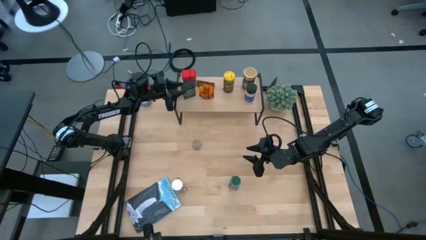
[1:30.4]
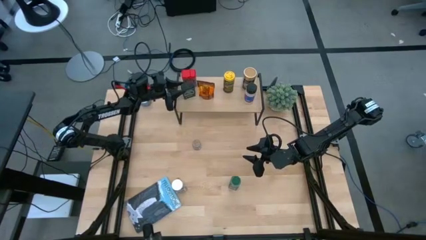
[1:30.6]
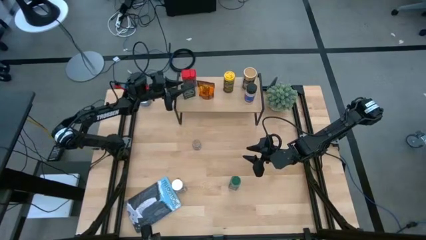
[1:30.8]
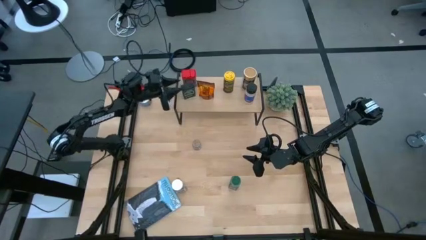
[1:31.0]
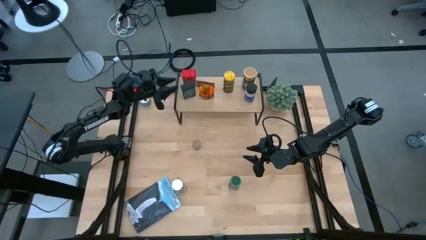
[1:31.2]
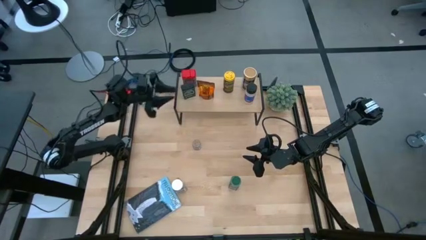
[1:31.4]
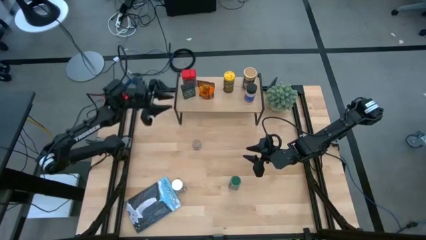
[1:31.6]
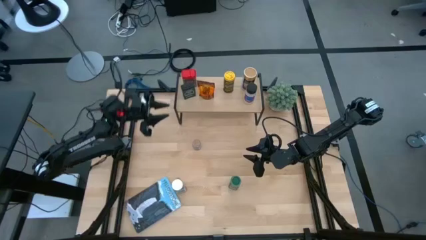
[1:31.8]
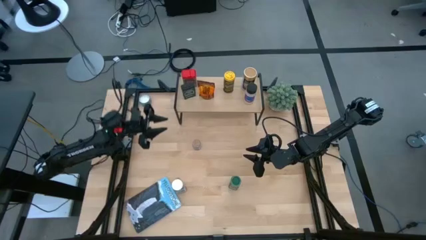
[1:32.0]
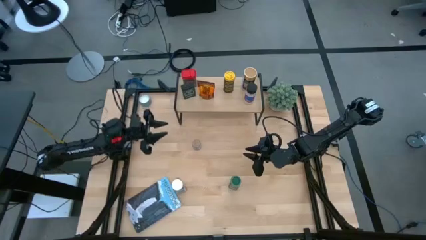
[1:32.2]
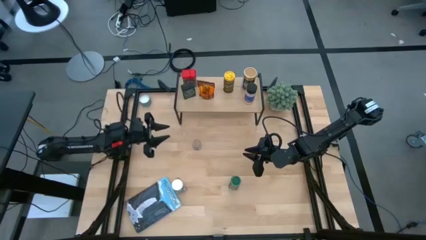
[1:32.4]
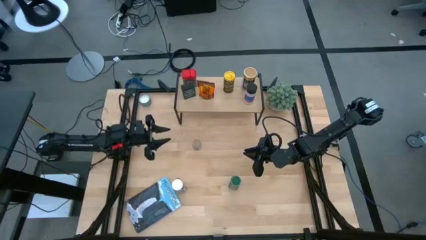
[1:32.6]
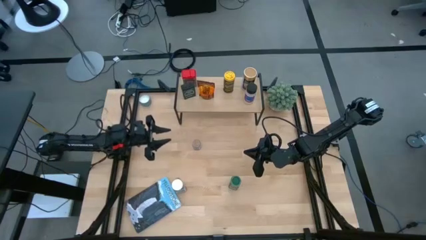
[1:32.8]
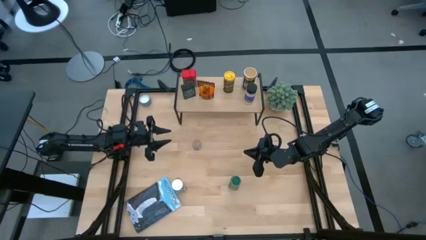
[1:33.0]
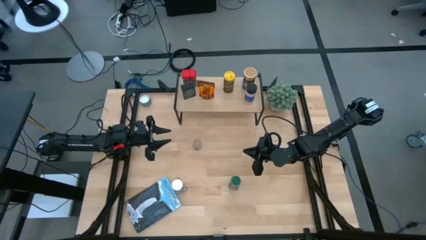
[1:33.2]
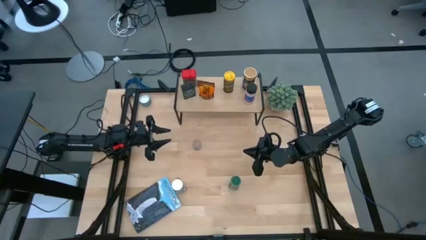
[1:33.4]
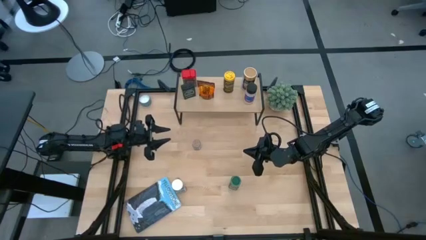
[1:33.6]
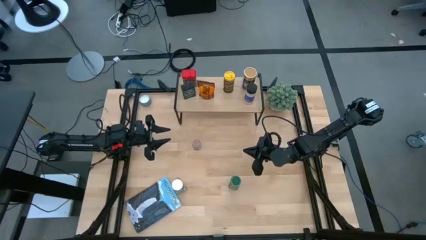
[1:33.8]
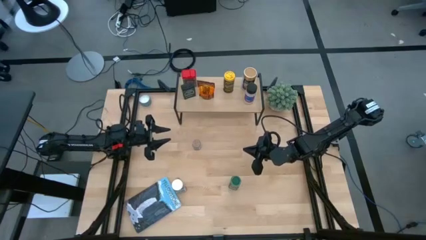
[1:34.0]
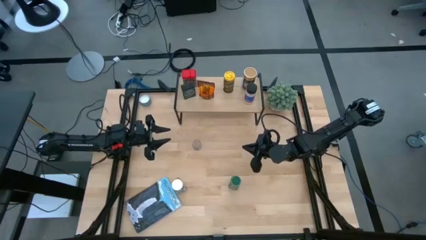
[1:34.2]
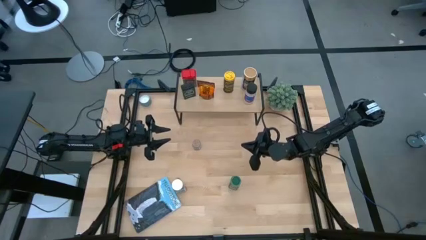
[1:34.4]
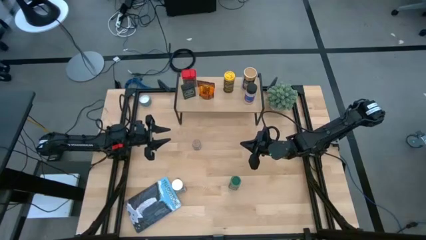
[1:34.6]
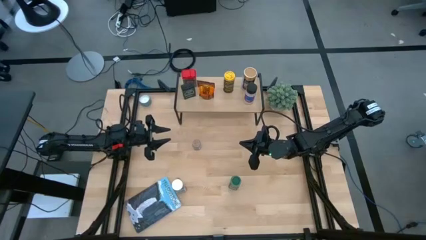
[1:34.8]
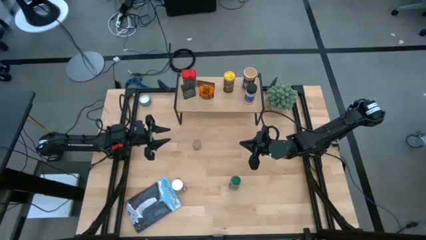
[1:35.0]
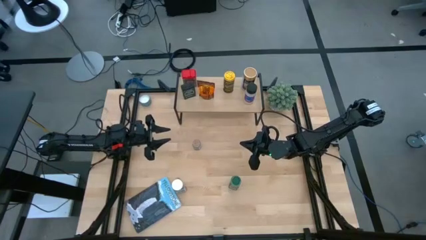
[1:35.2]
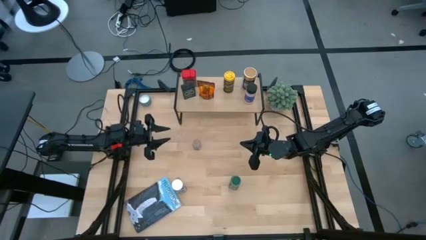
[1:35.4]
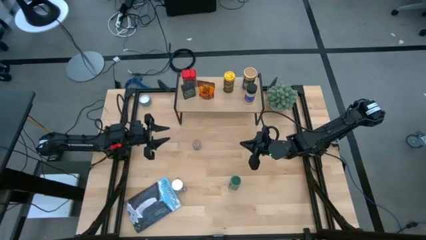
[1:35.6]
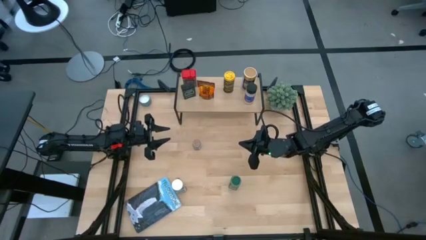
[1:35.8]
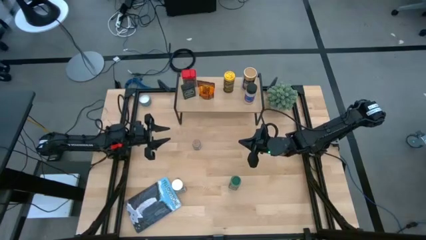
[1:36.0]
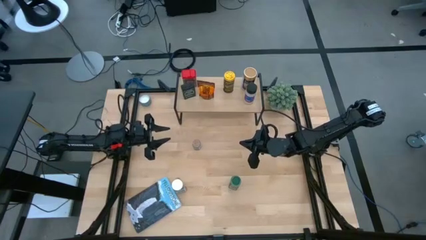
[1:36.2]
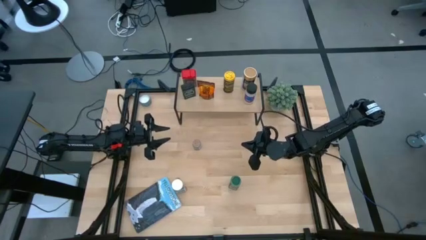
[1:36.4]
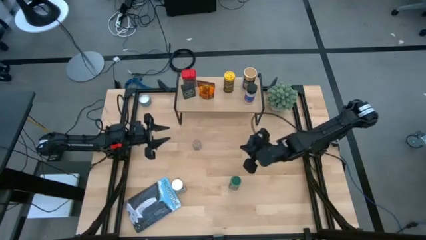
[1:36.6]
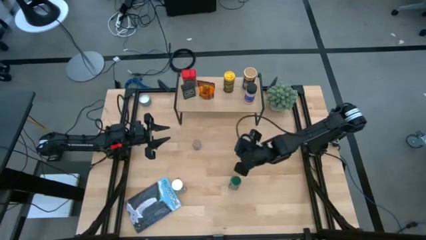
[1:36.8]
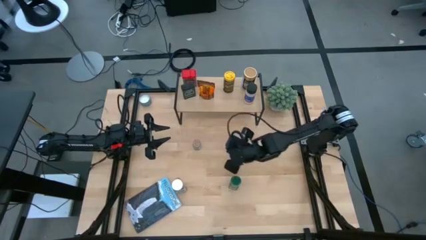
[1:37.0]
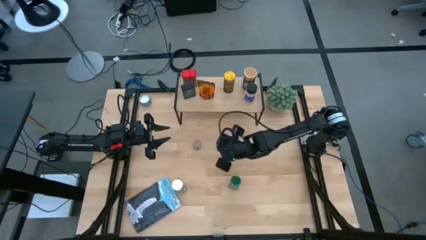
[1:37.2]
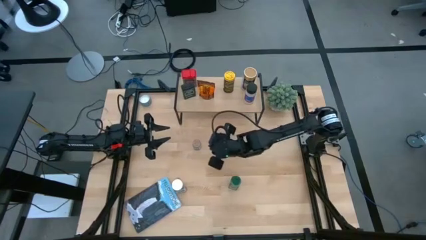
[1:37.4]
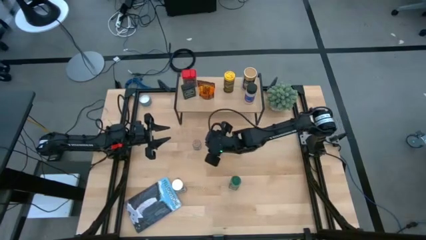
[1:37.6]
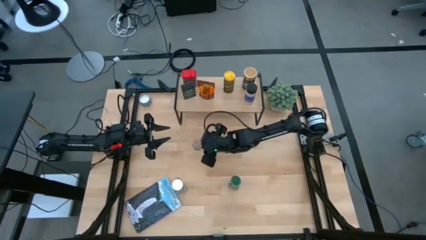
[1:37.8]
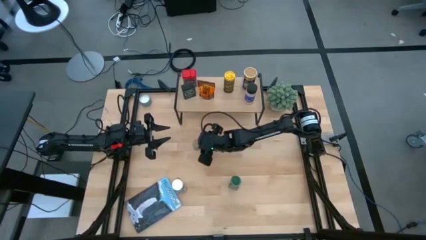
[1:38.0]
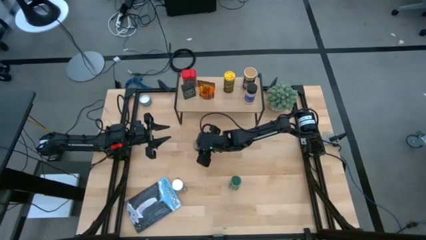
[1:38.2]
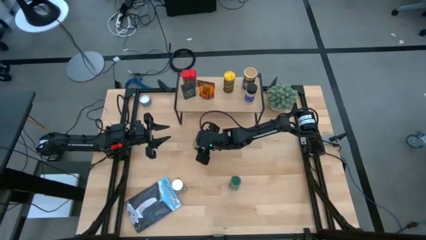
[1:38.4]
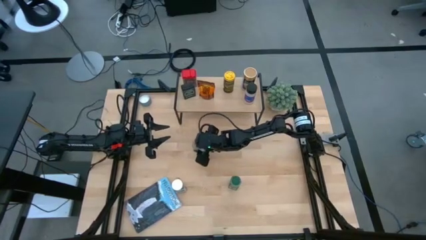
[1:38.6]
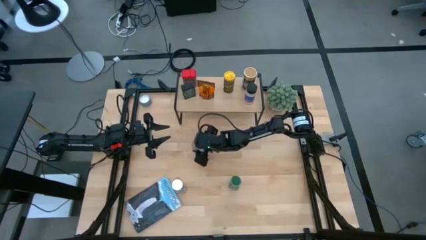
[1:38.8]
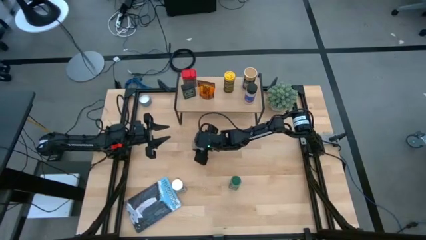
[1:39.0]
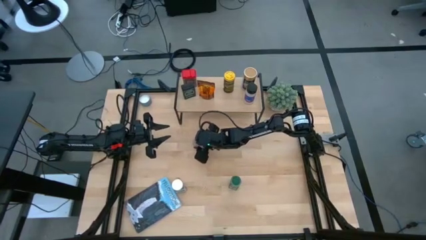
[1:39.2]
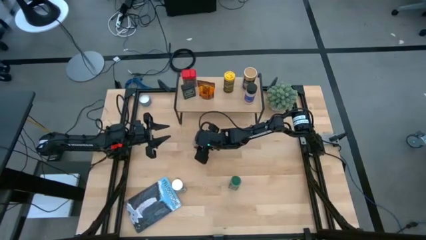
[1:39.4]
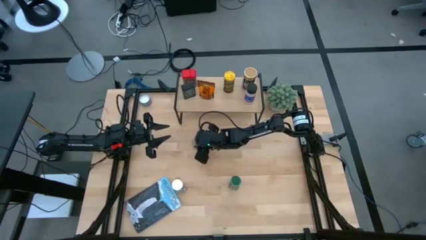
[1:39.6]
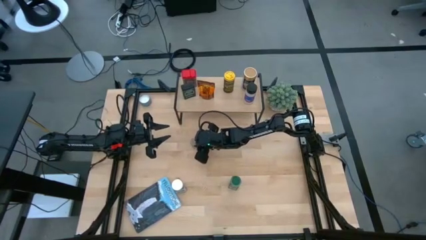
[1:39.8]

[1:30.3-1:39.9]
Task: Shelf spices
Put the brown seasoning on the shelf

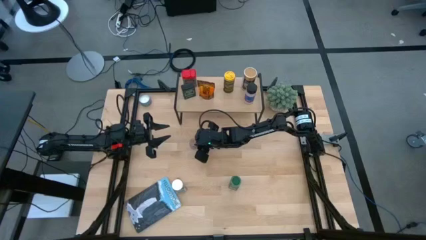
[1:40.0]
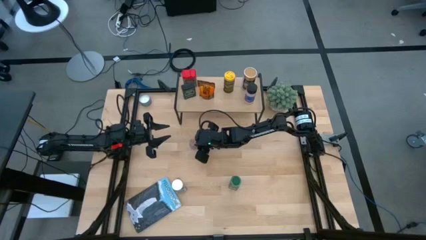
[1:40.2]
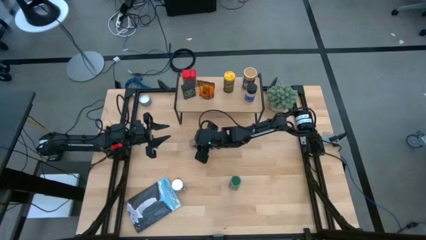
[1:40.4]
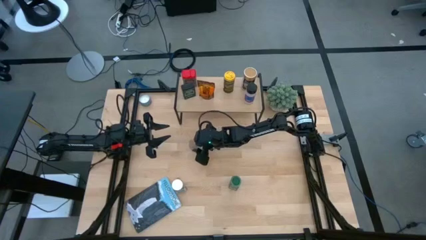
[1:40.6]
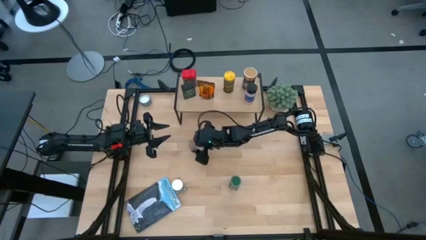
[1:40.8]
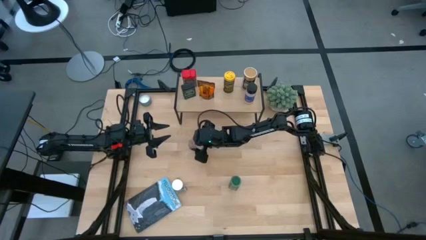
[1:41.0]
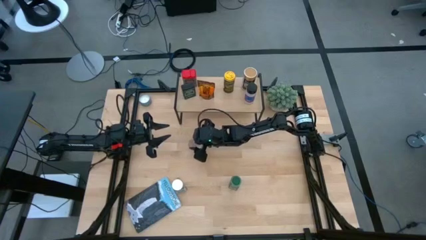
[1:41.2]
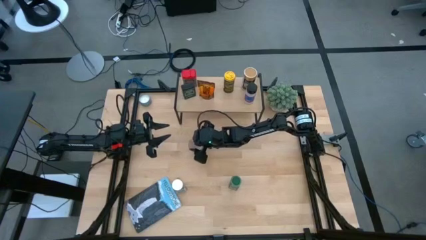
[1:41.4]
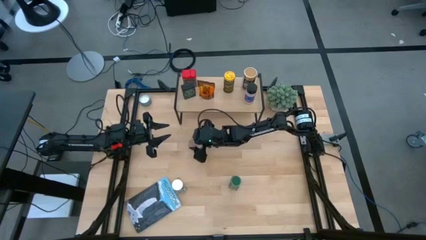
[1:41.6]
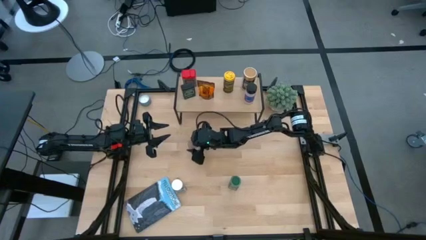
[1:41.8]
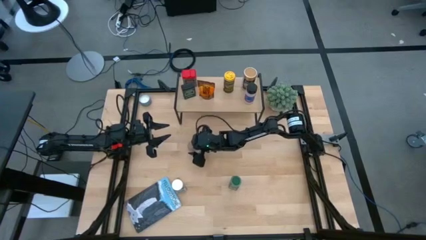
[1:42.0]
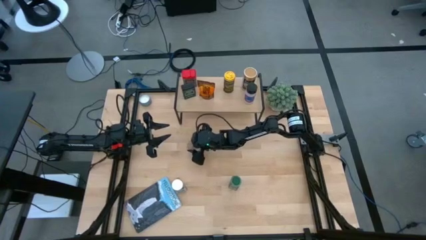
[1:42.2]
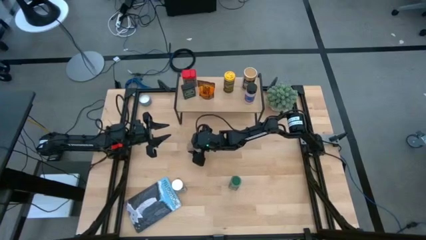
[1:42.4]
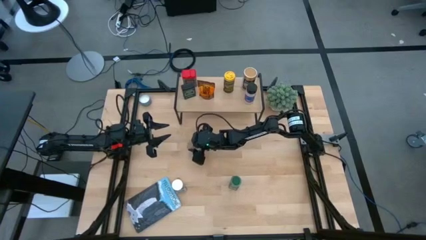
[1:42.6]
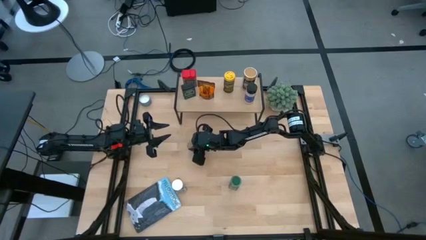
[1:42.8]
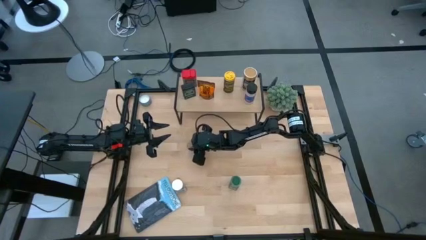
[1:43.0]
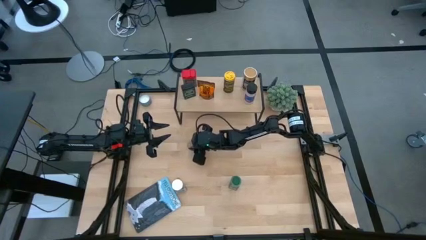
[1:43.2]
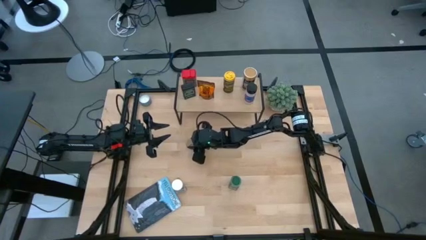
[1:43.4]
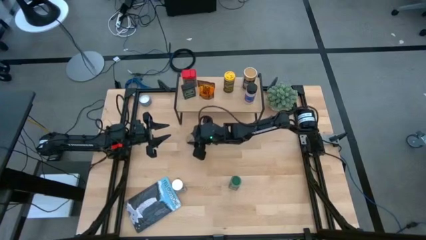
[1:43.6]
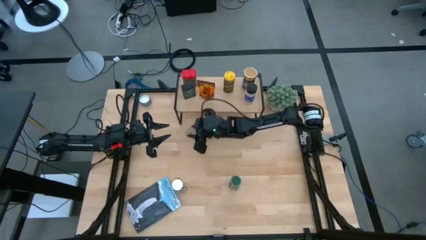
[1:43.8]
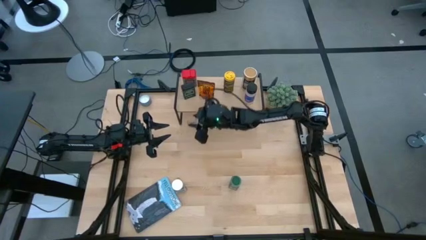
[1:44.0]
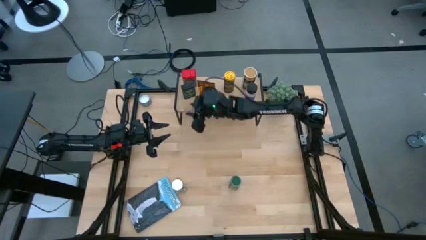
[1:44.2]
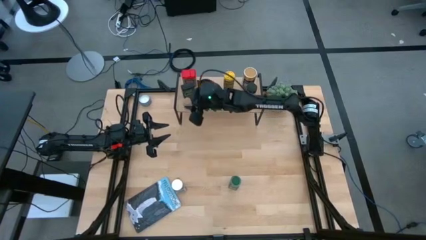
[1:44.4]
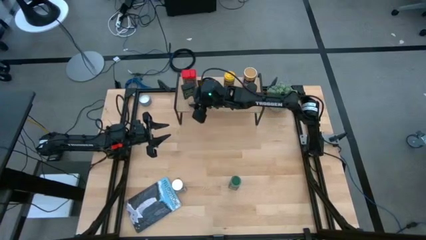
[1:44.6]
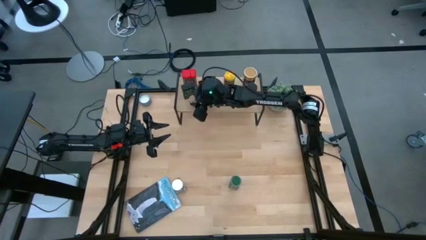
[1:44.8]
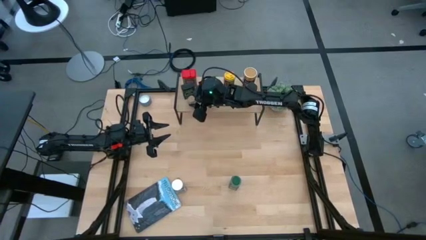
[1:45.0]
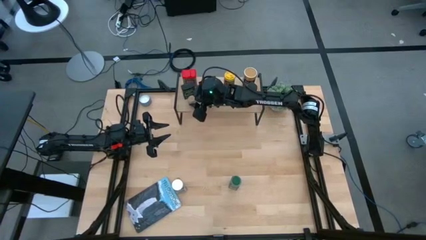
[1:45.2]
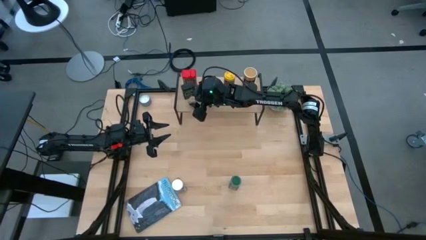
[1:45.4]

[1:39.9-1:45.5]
Put the brown seasoning on the shelf

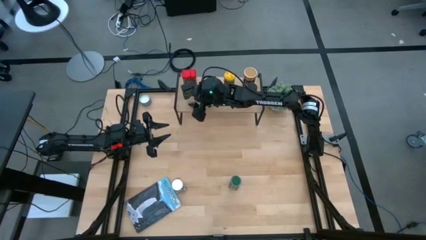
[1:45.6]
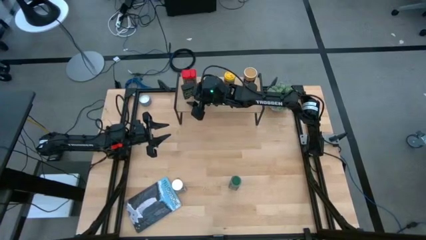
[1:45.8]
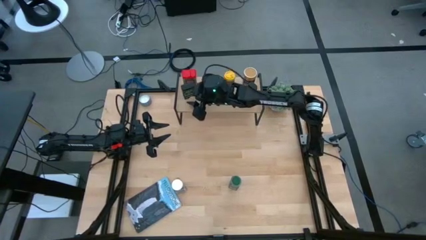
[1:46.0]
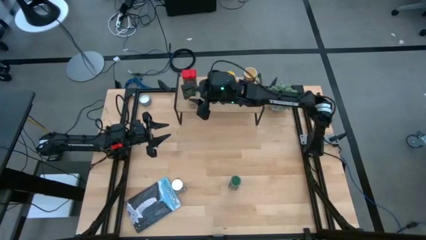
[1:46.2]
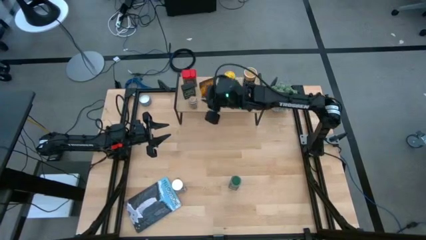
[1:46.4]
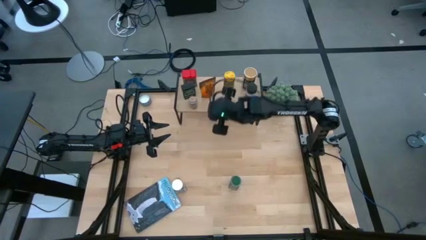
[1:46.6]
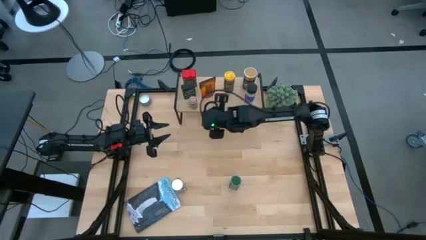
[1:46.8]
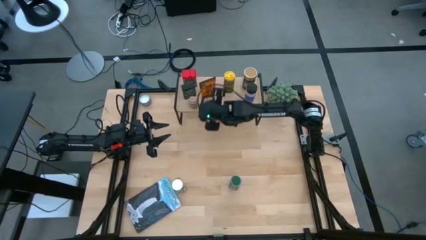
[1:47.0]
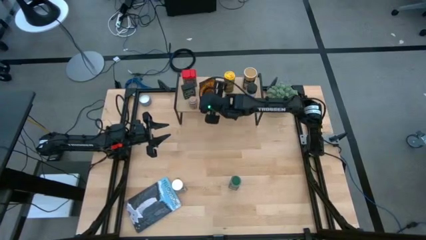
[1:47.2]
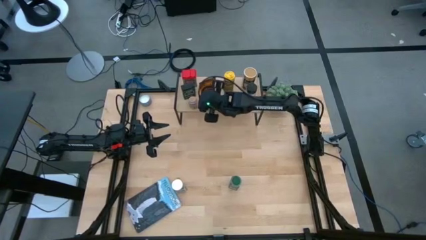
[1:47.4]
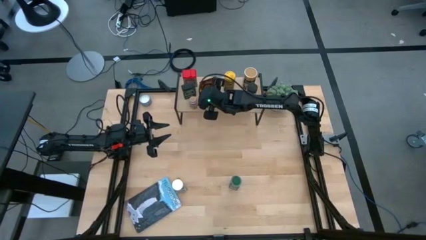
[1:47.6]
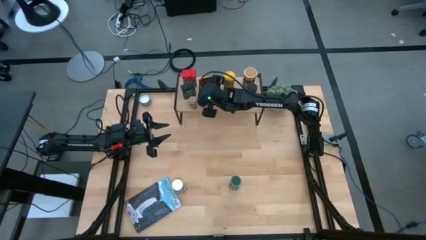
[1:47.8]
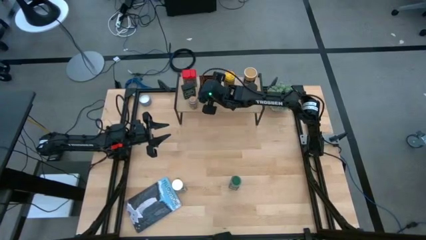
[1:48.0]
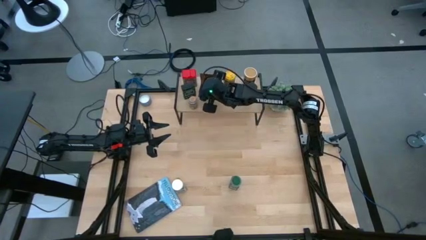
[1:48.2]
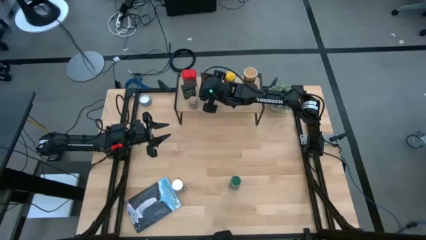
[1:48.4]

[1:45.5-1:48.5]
Adjust the orange seasoning bag
